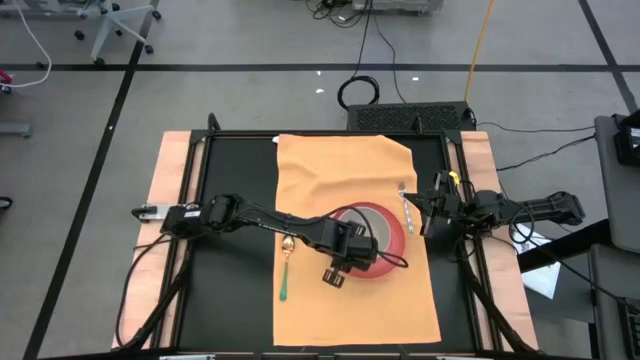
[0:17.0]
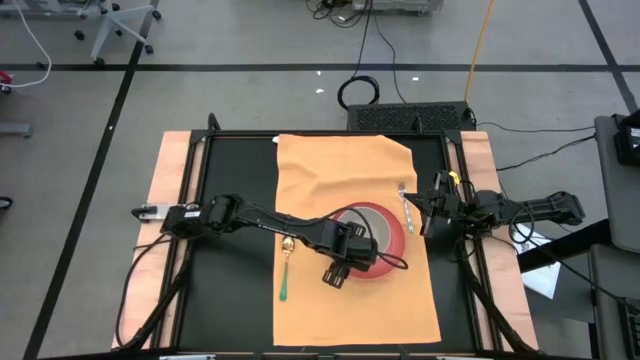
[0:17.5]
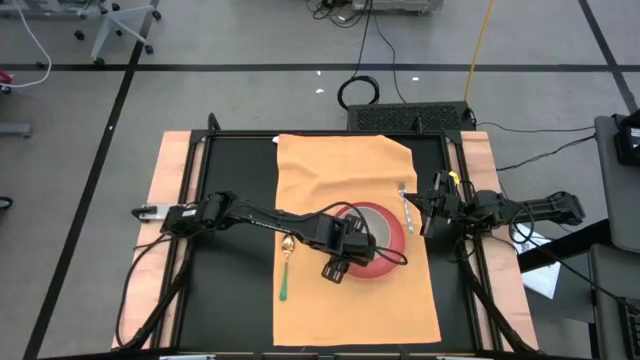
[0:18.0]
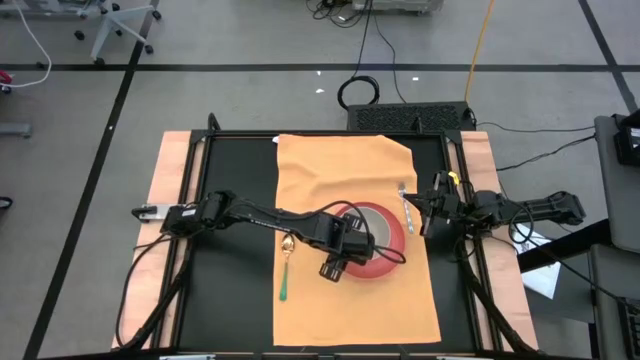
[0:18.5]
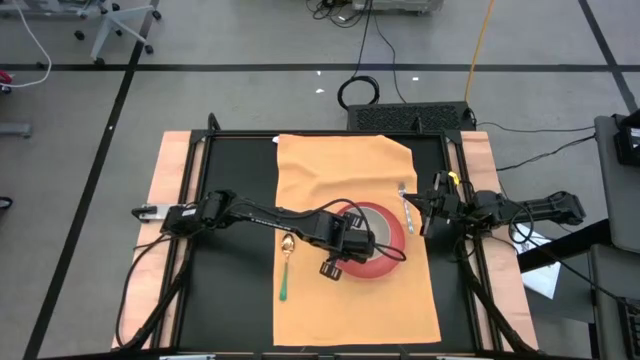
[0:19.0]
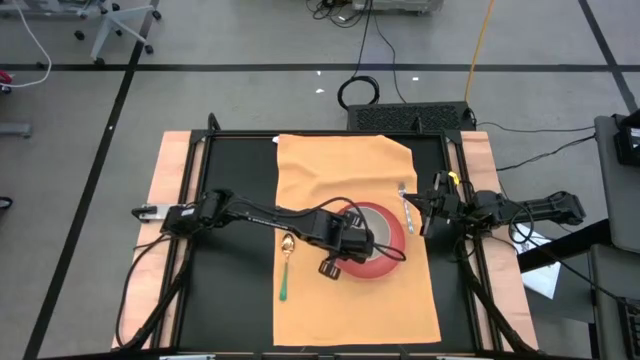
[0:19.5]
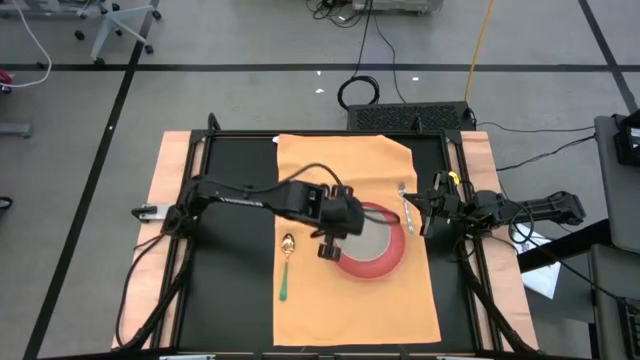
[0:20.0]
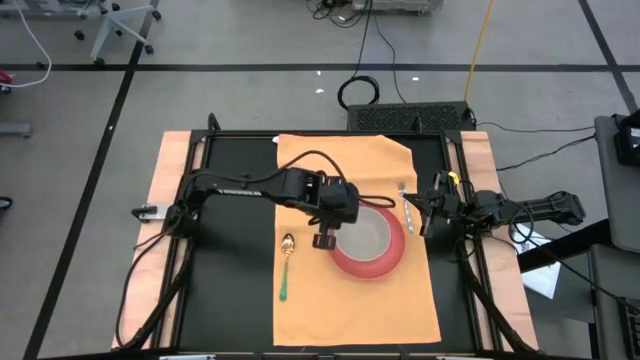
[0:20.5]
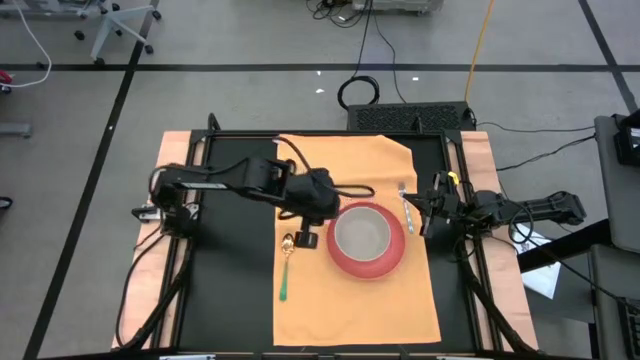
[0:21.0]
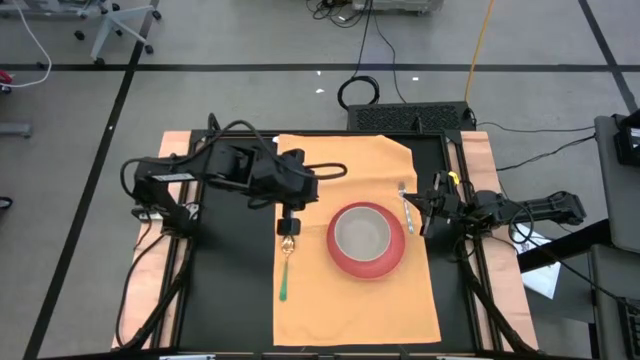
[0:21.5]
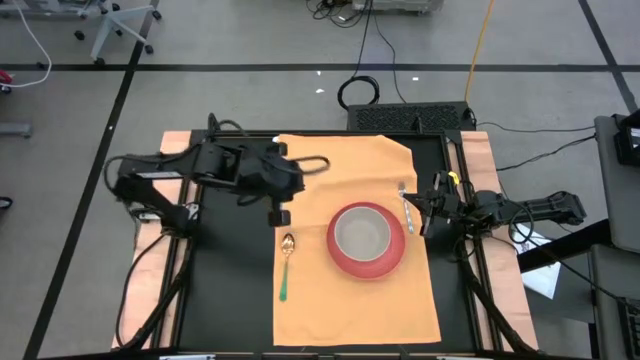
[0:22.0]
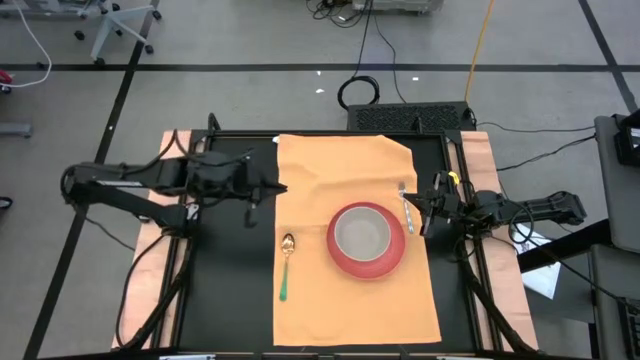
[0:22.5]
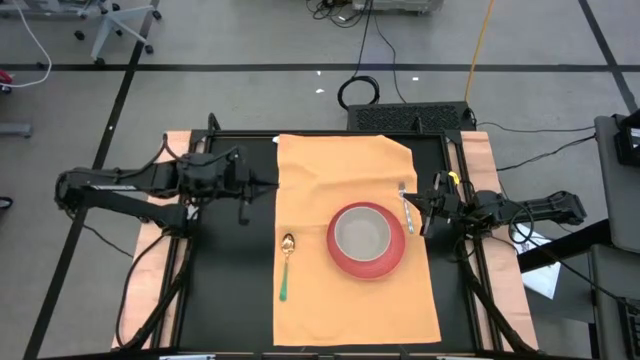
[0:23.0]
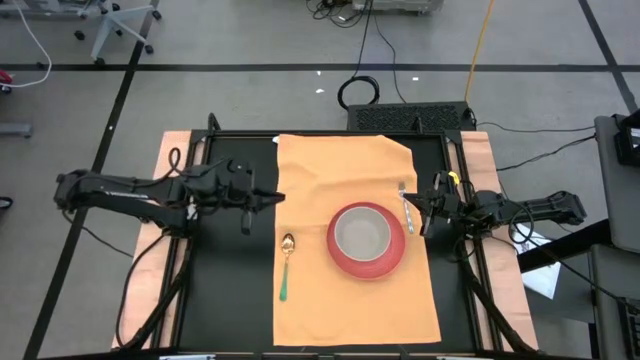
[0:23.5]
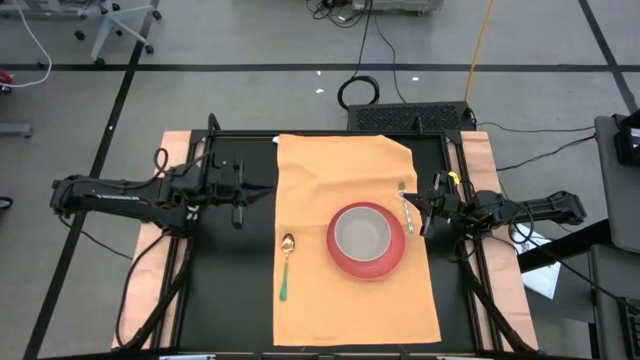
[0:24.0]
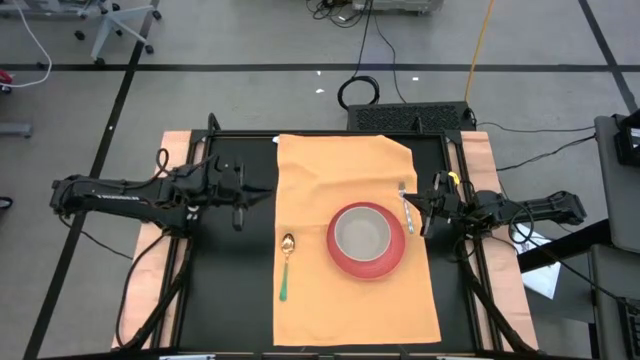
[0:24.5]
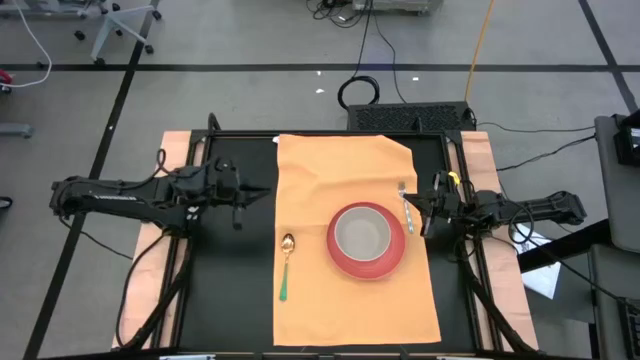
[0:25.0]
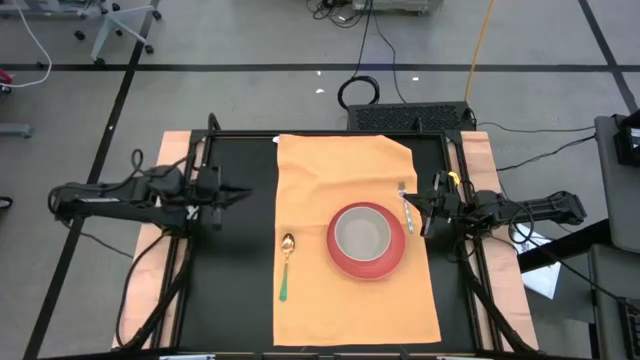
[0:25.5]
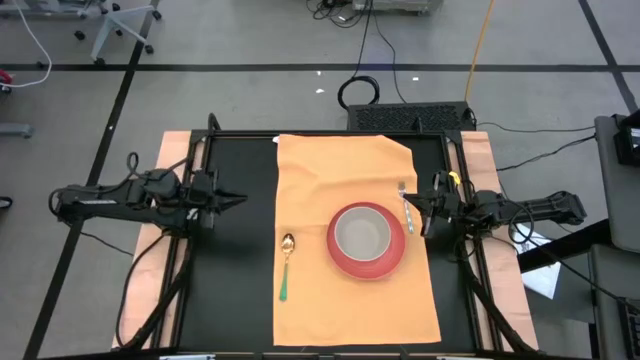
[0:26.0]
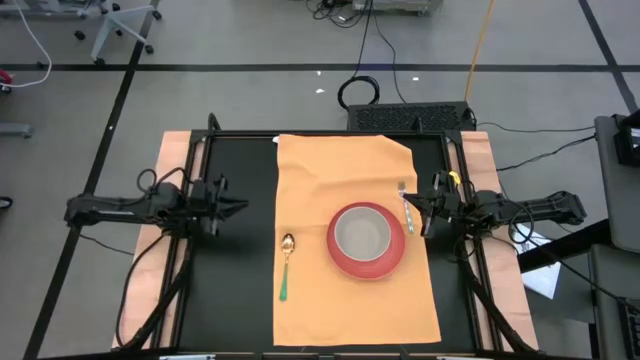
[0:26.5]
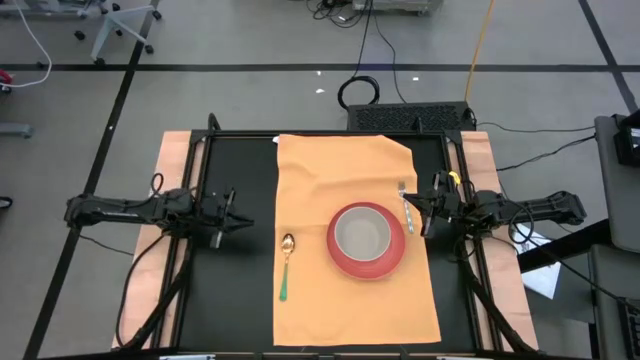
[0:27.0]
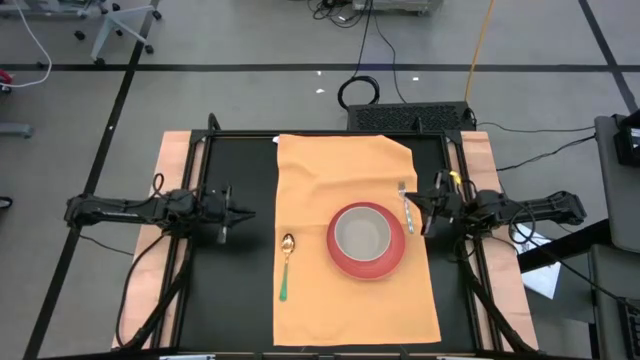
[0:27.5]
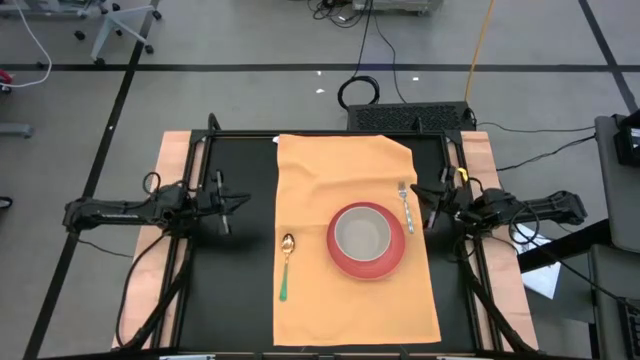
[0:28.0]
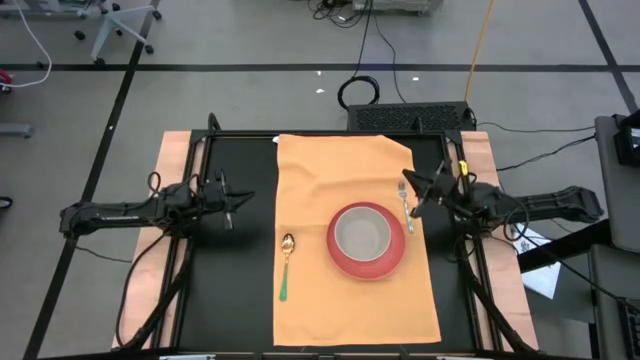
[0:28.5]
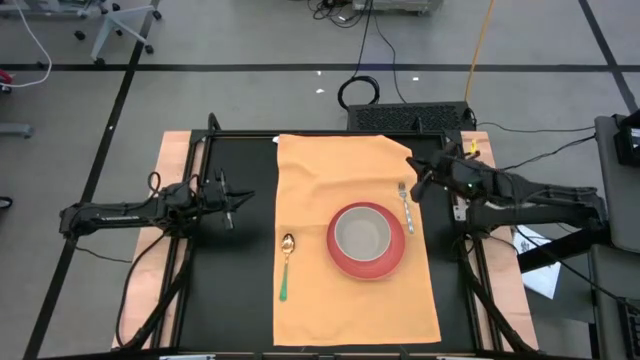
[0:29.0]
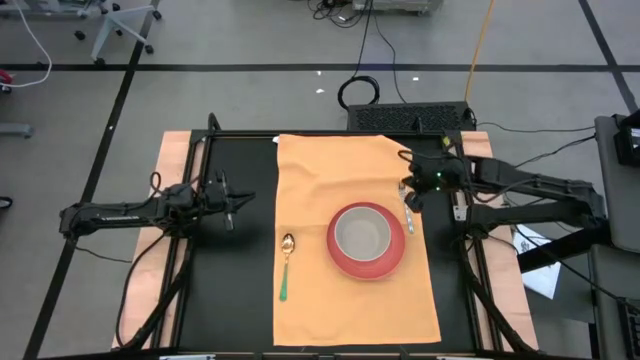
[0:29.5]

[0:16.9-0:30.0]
Task: Set table place
Put the fork to the right of the plate on the napkin

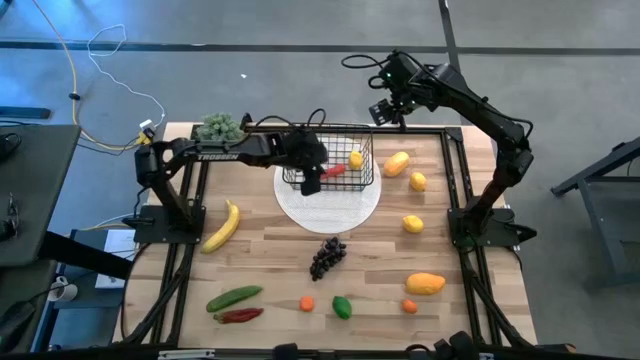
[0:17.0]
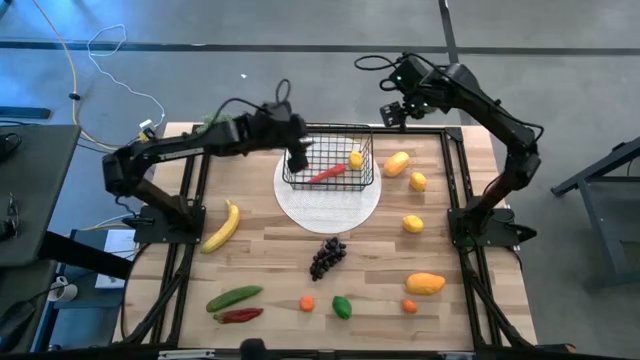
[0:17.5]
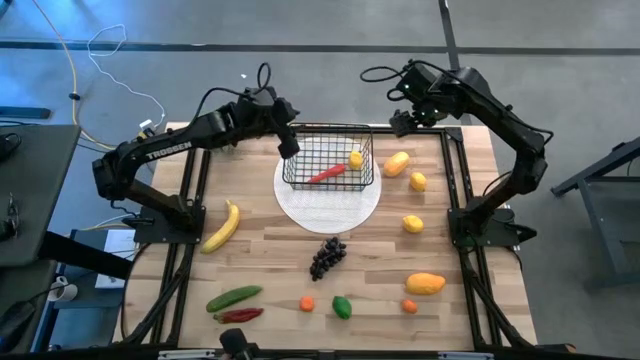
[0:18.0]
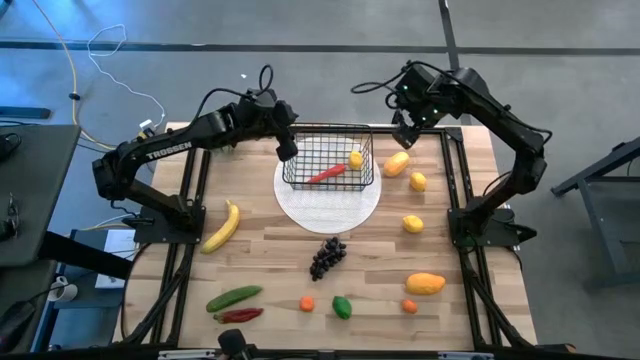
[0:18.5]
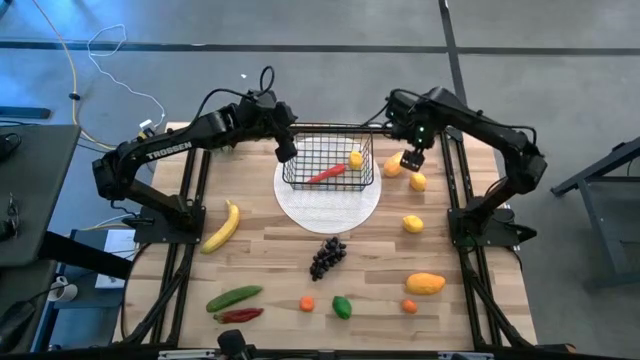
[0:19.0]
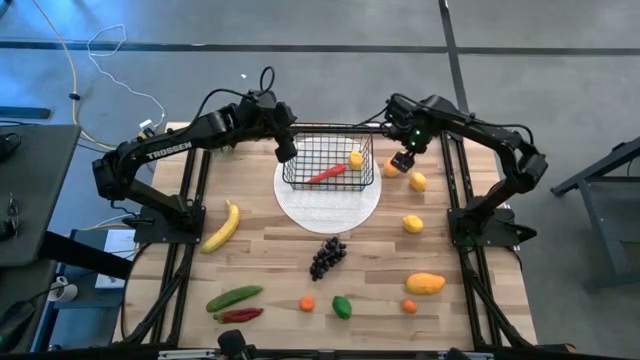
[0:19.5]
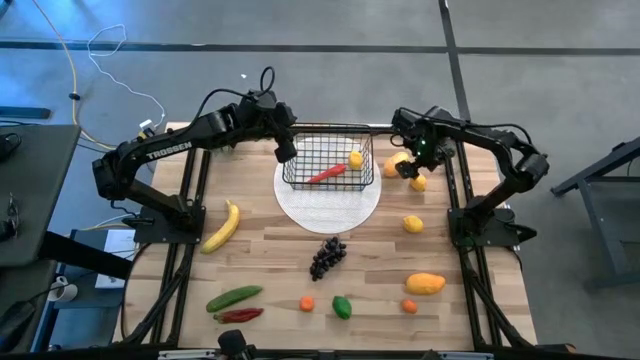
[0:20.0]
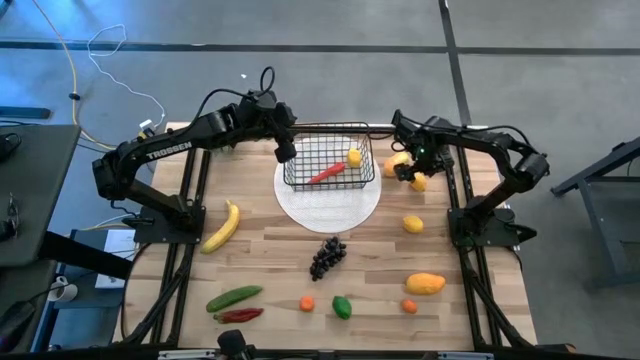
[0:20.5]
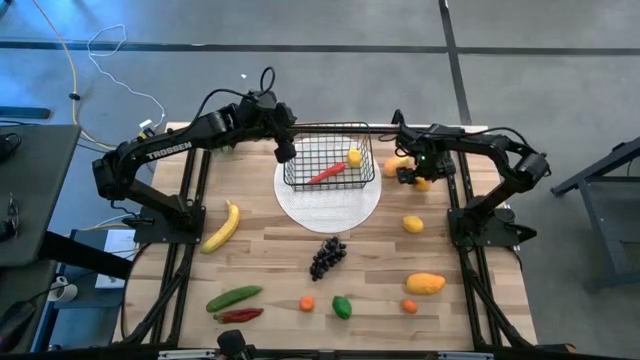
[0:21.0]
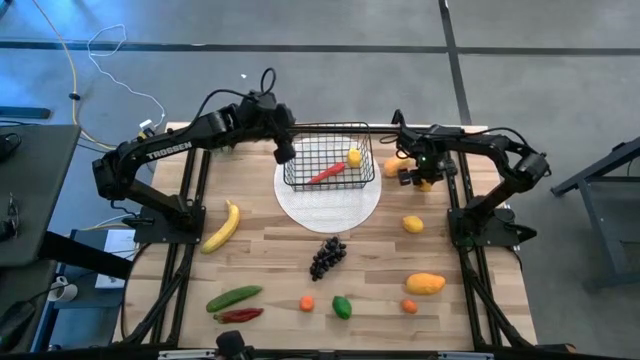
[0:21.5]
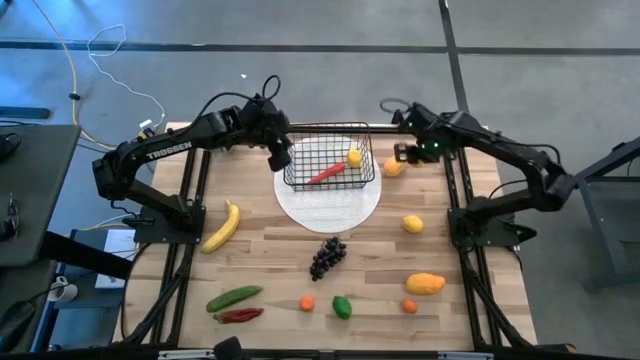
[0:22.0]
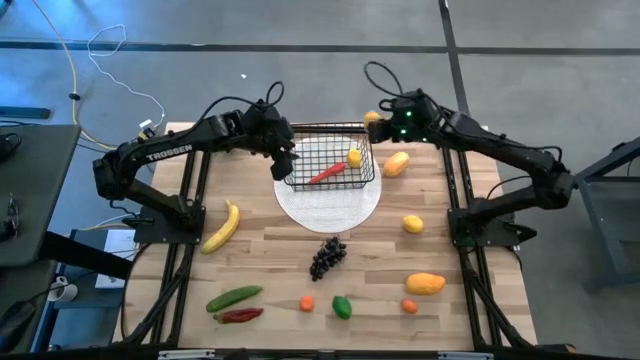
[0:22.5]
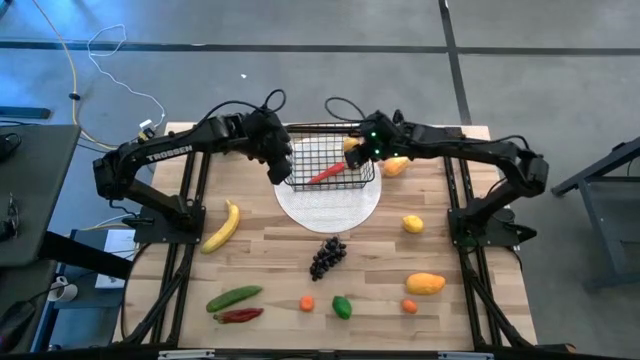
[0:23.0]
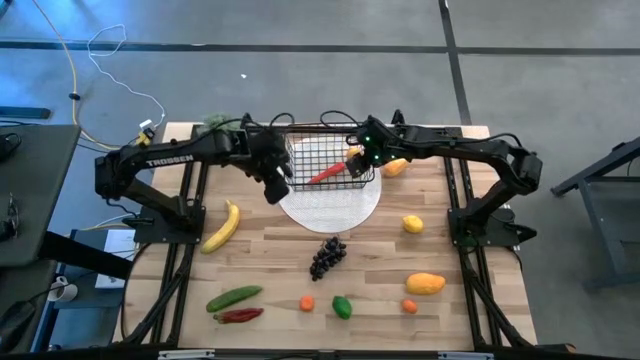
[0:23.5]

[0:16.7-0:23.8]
Task: Build produce basket
Put the top yellow lemon into the black wire basket

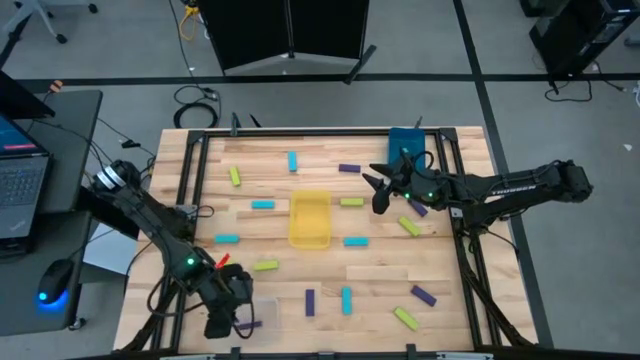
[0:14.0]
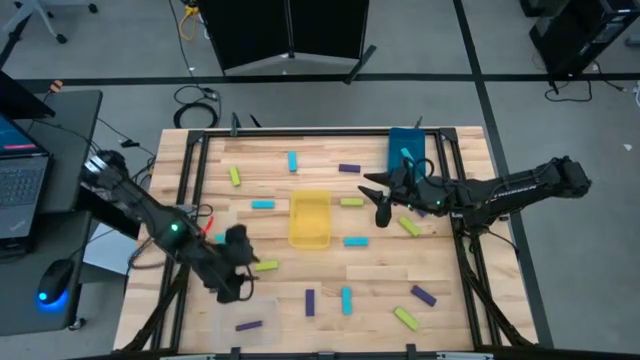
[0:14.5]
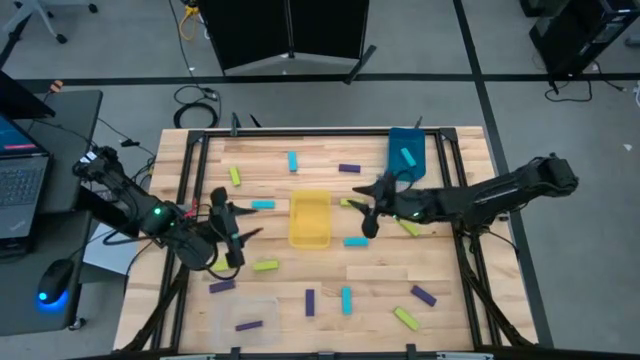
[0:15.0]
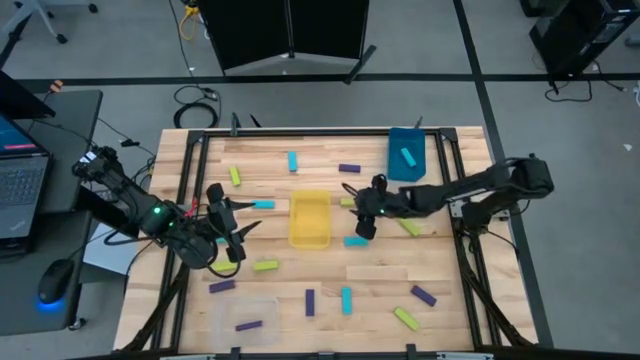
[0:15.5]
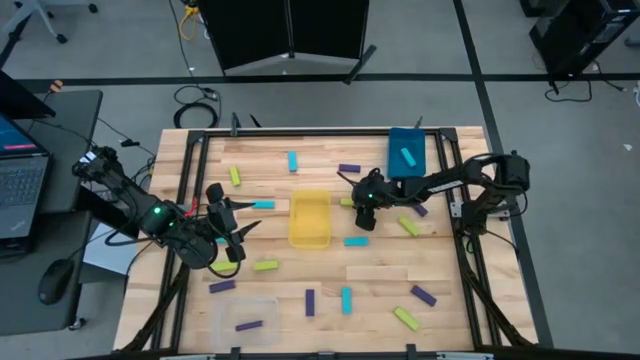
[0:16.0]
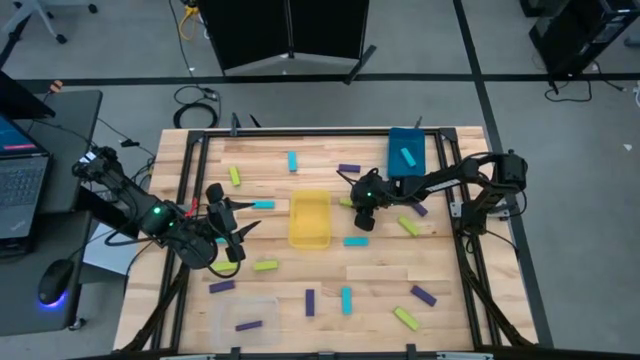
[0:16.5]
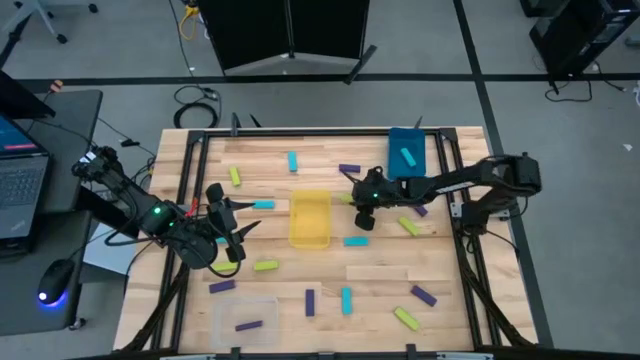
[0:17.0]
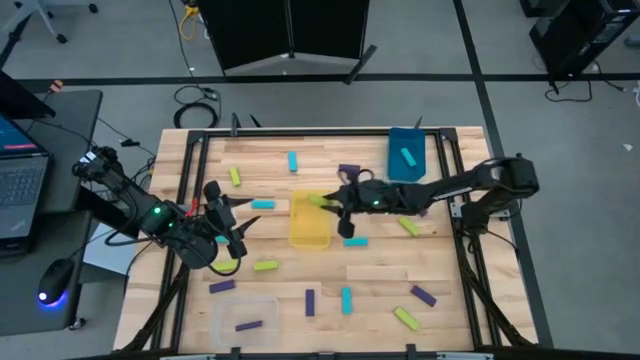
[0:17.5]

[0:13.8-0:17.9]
Task: Sort blocks
Put the light green block into the yellow bin
